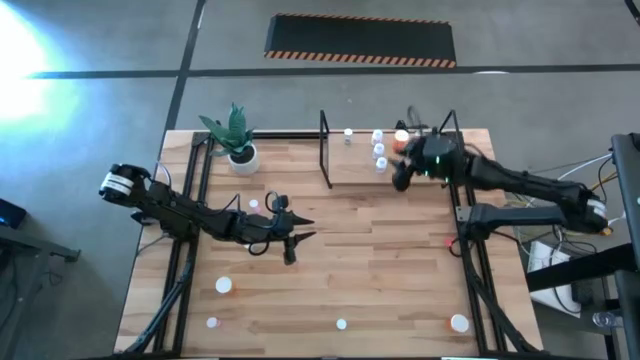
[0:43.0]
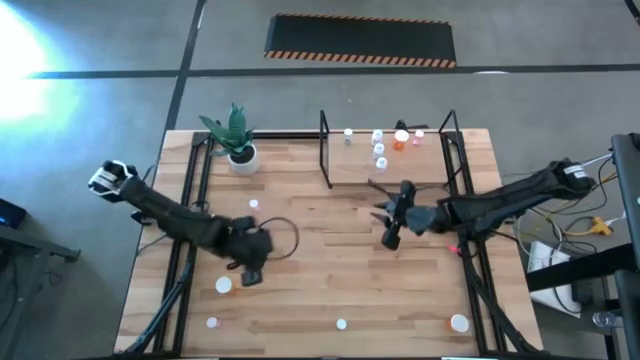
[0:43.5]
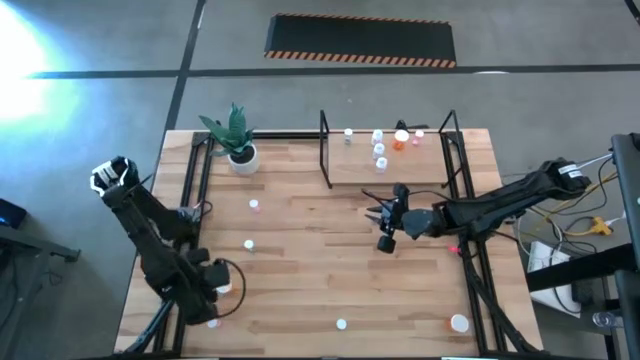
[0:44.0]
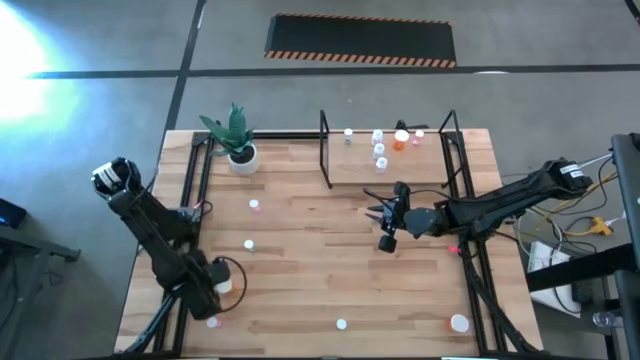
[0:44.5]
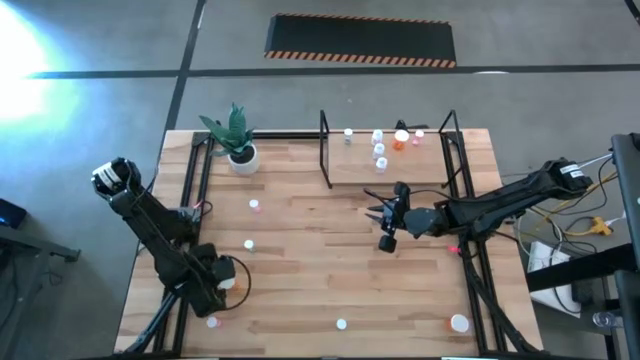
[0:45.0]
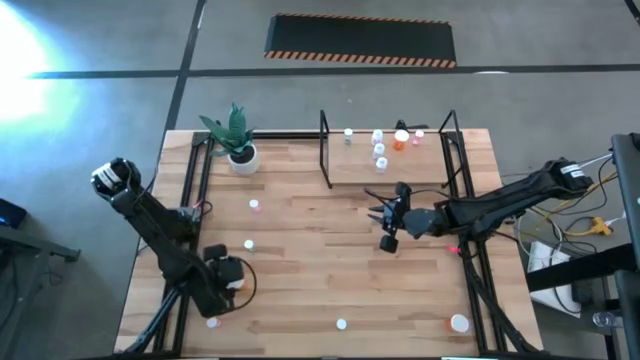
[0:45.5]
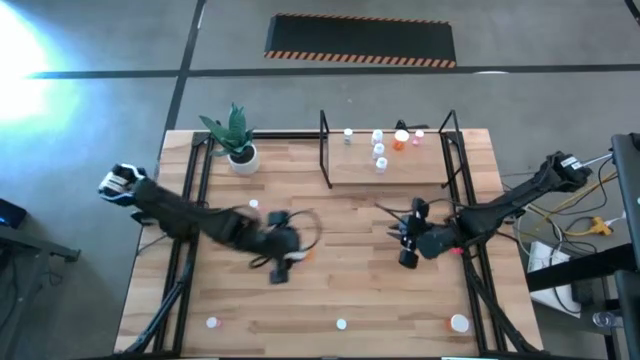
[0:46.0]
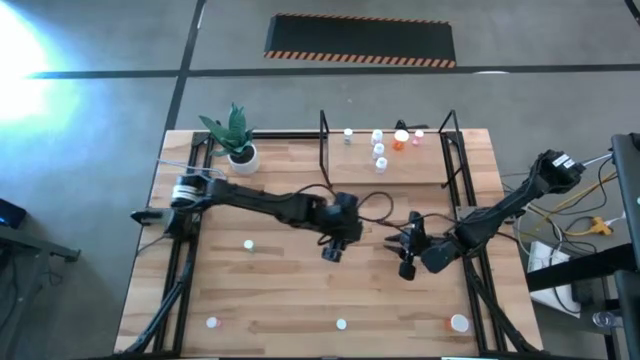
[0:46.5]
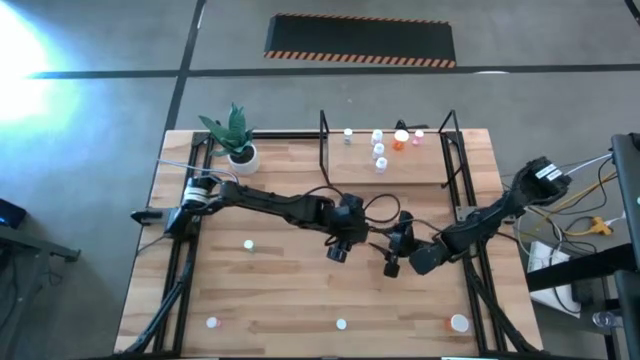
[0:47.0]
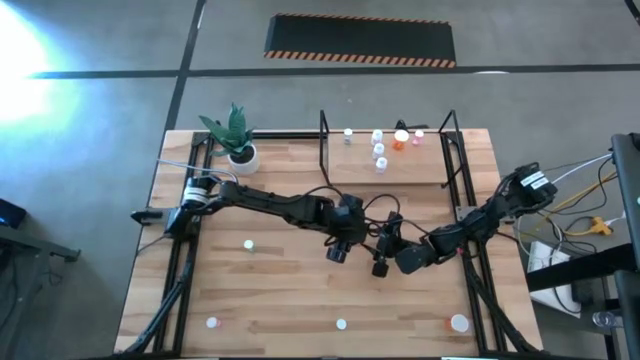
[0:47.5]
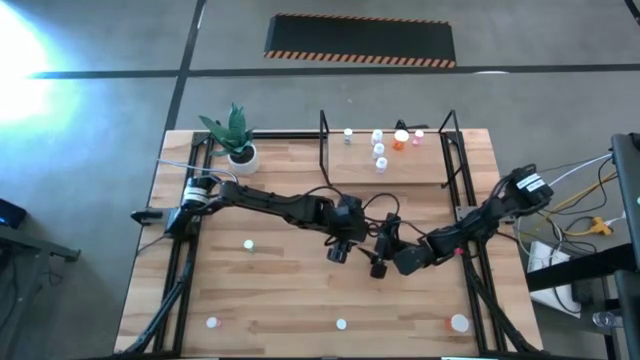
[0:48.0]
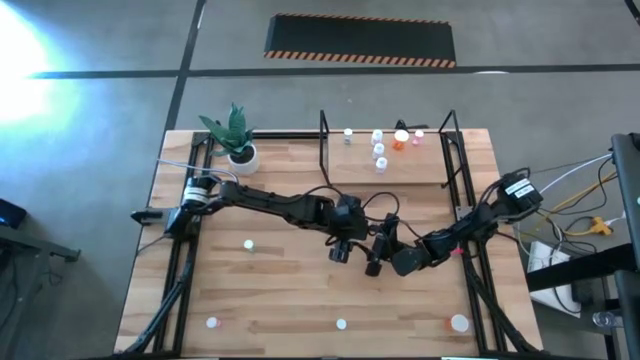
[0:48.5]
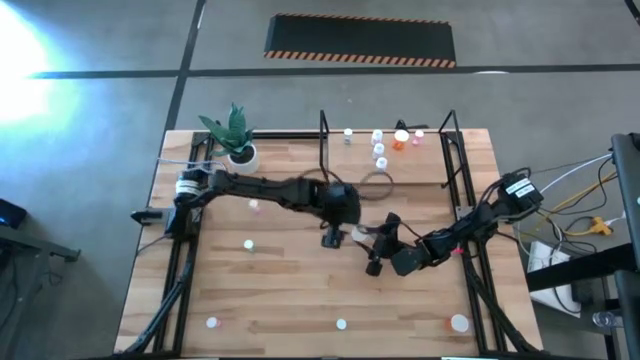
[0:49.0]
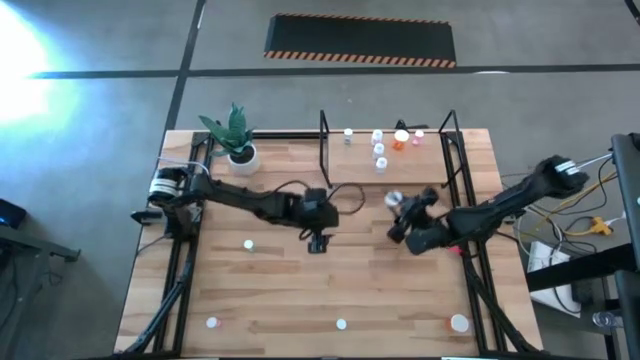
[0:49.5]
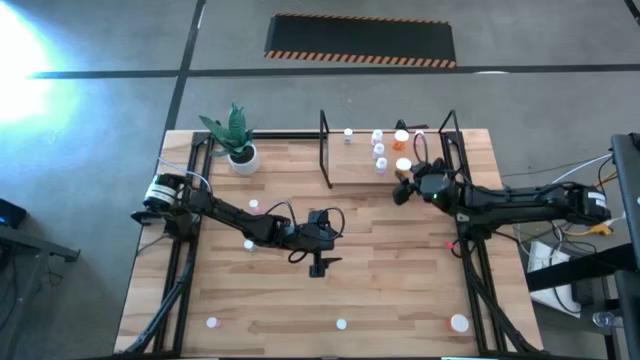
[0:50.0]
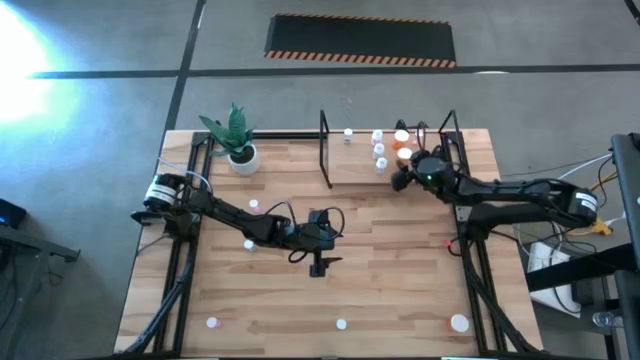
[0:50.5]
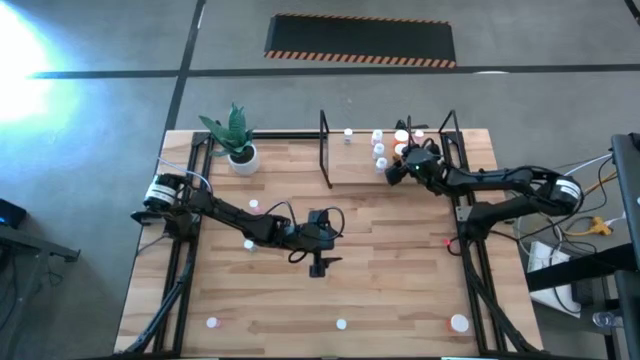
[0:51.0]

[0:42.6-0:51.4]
Task: Pick and place medicine bottles onto shelf by color
Put the left orange pill bottle on the shelf aligned with the other orange pill bottle

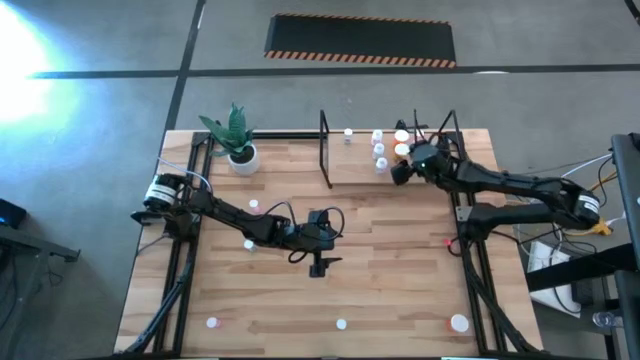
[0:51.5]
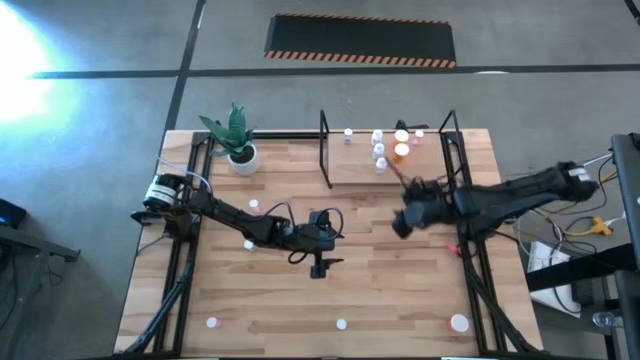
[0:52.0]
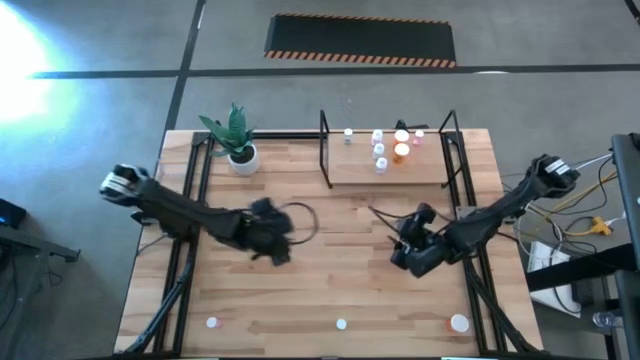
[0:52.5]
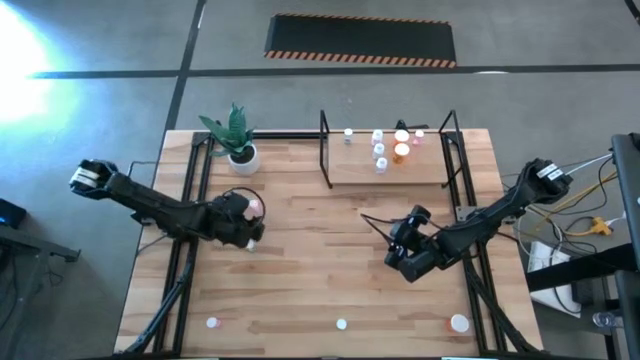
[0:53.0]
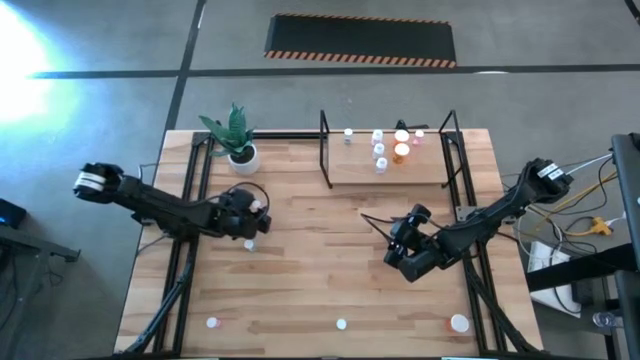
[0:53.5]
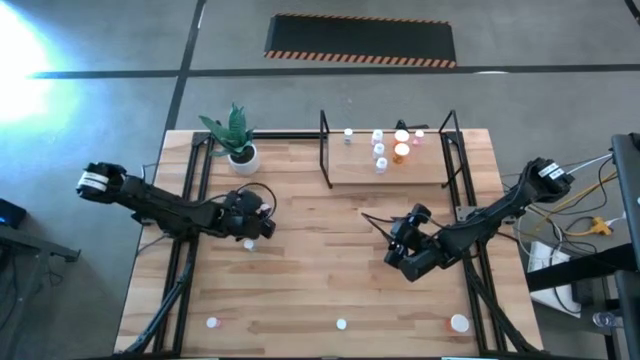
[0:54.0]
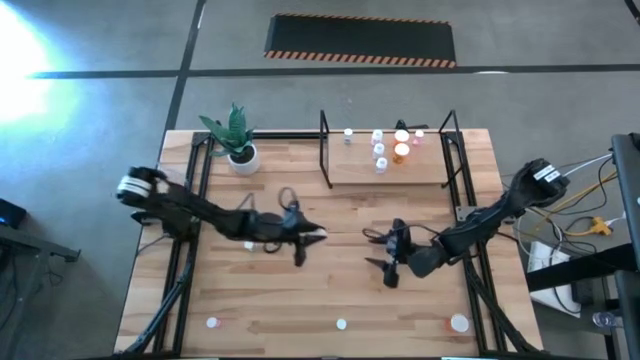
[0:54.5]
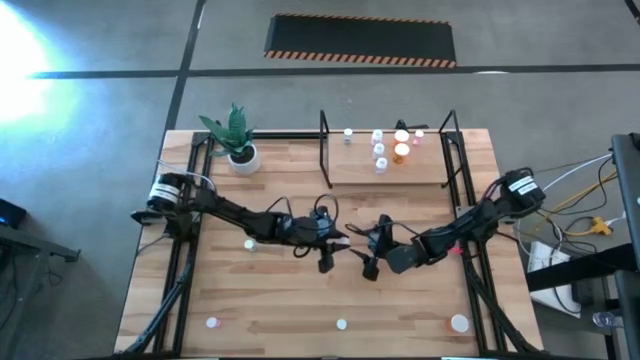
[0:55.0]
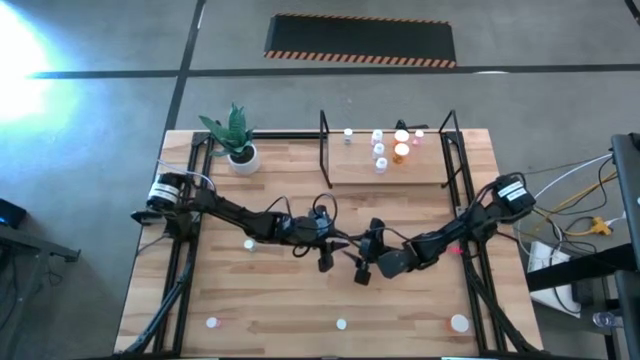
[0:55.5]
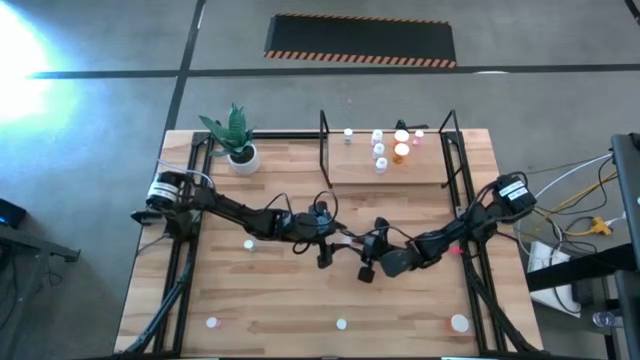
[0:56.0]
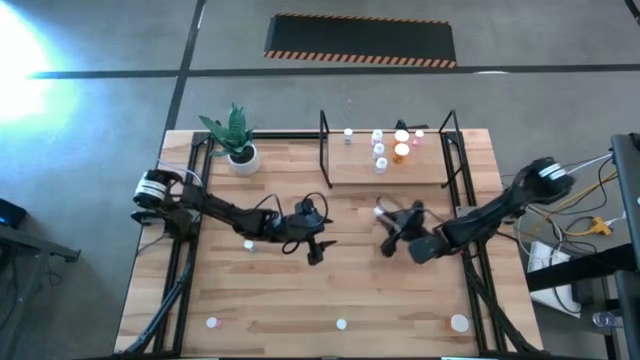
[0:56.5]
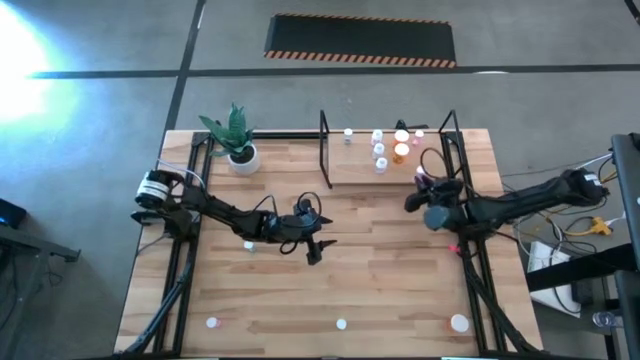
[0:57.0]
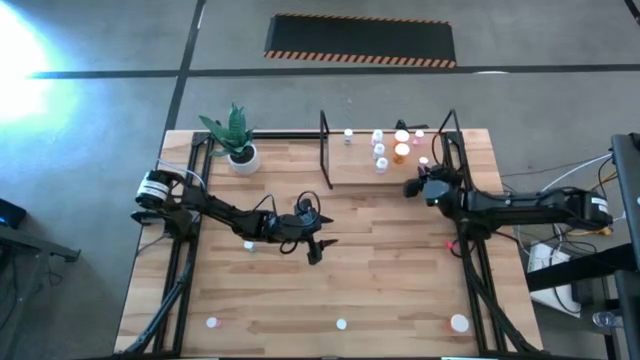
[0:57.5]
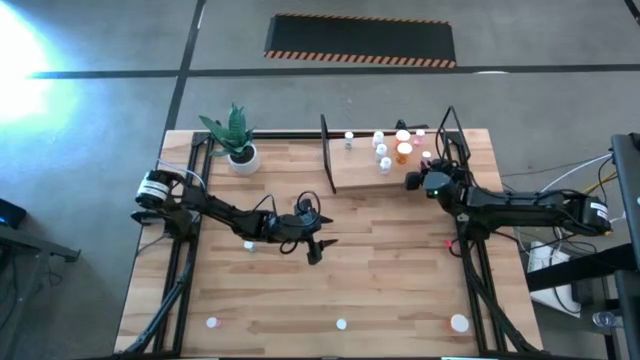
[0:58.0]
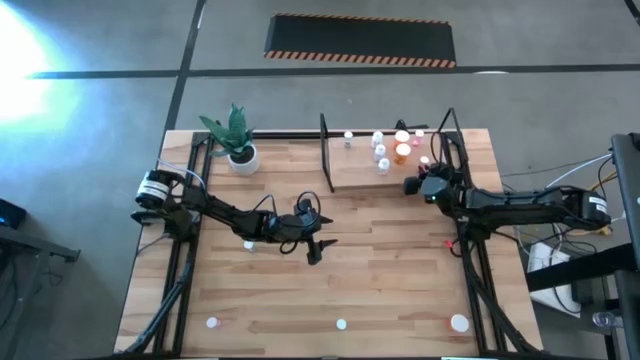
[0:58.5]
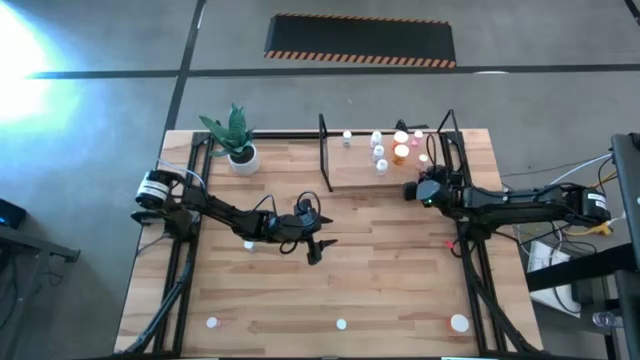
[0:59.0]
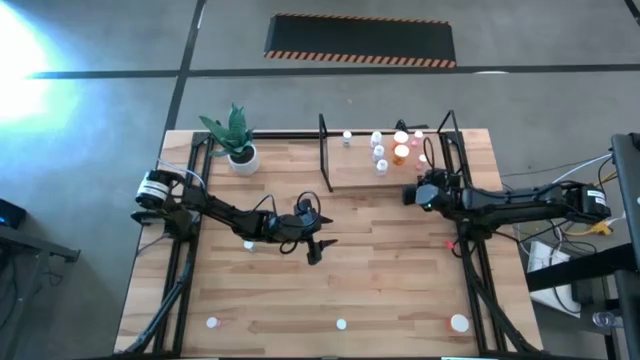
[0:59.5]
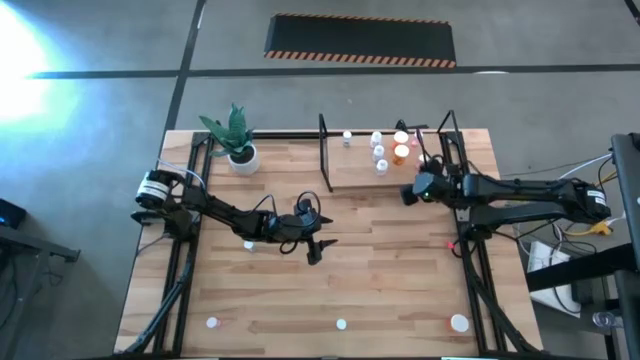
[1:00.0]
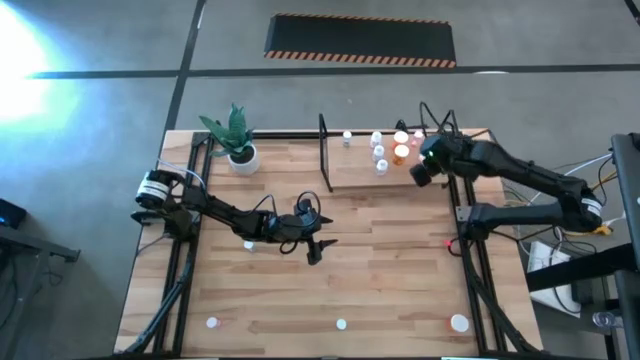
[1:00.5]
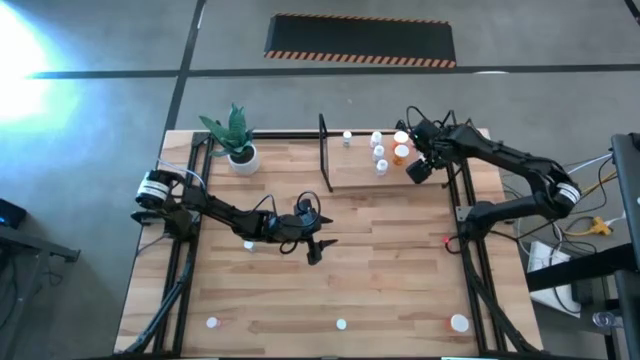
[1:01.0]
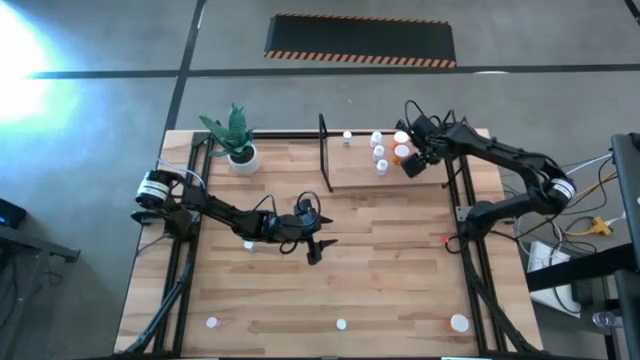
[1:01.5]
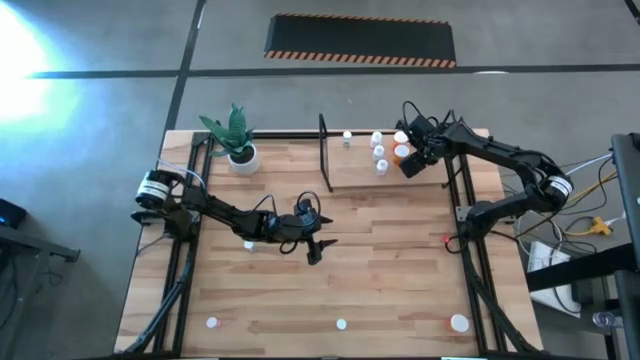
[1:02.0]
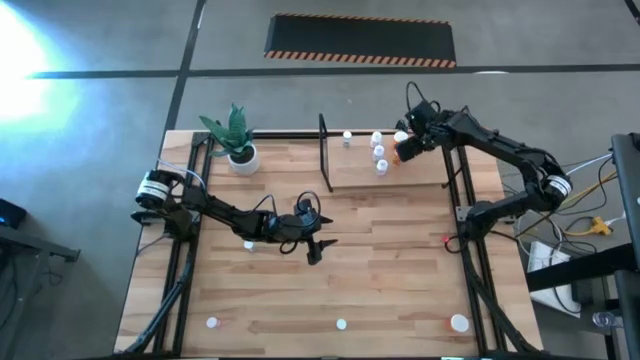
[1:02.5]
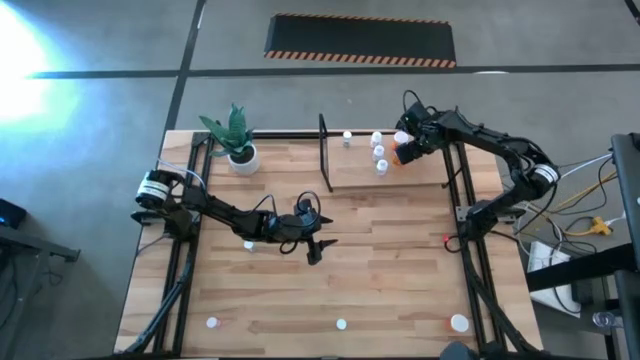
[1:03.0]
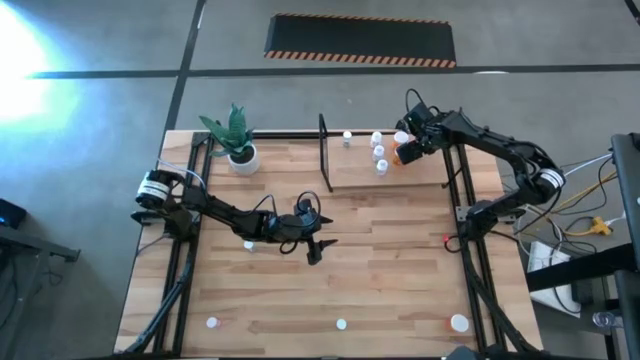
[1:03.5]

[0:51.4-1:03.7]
Put the top pink pill bottle on the shelf aligned with the other pink pill bottle

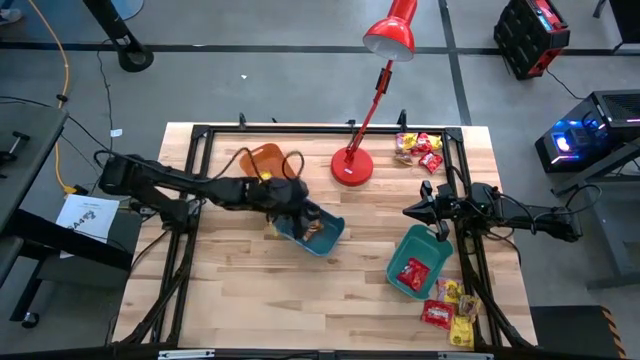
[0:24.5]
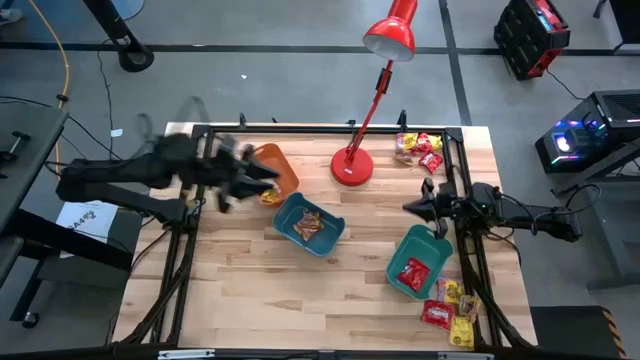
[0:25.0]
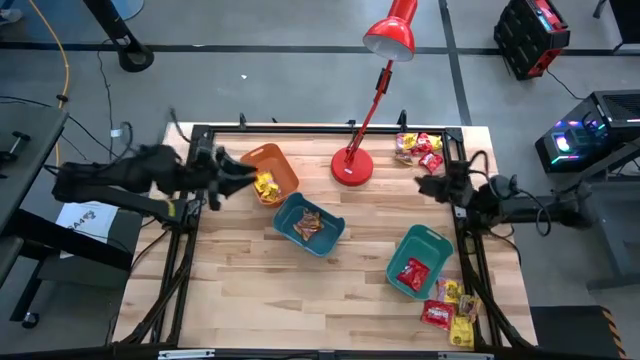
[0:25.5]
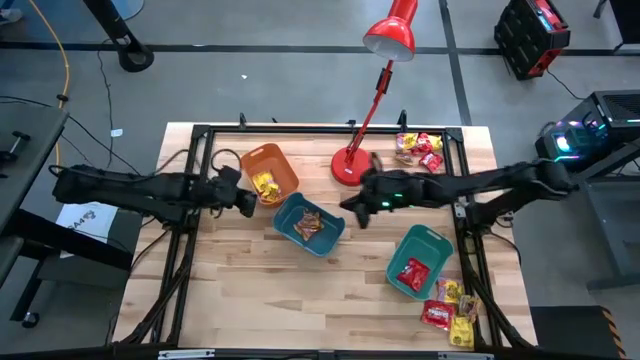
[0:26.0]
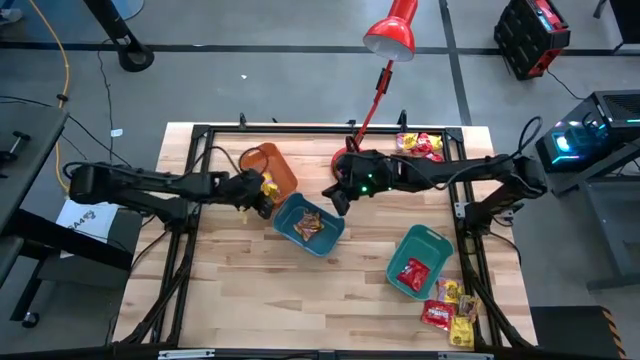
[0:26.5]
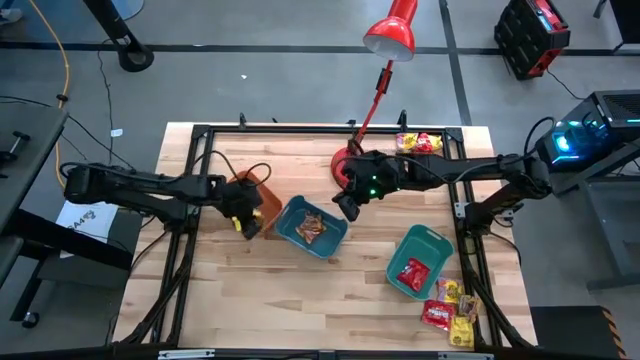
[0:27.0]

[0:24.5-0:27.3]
Task: Sort candy
Move the orange bin to the middle left of the table
